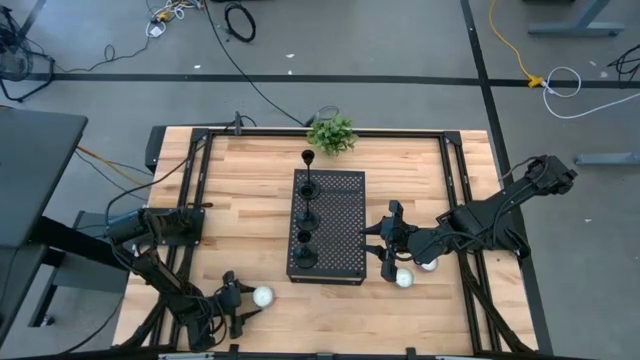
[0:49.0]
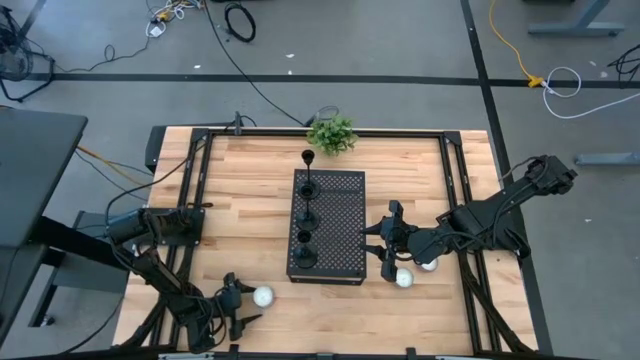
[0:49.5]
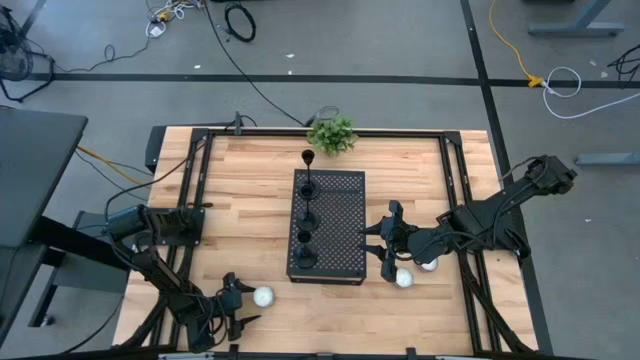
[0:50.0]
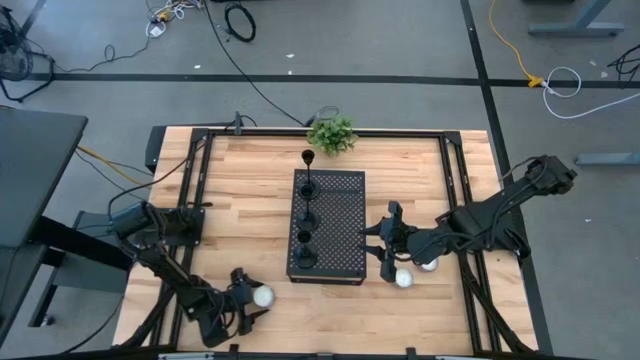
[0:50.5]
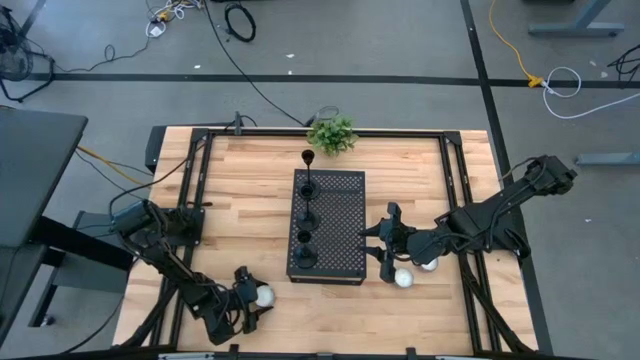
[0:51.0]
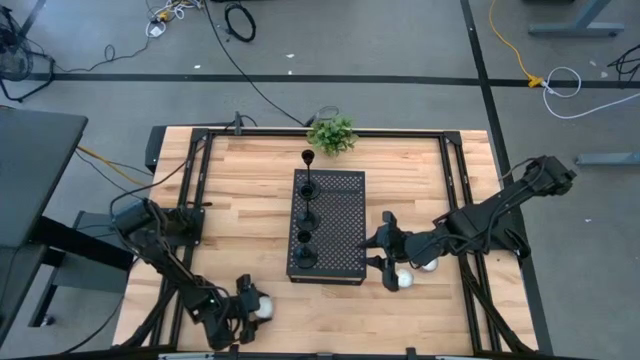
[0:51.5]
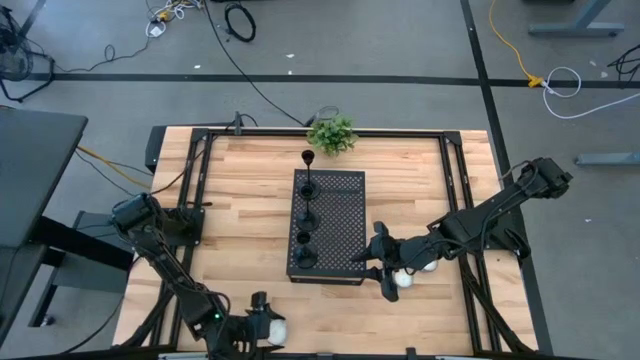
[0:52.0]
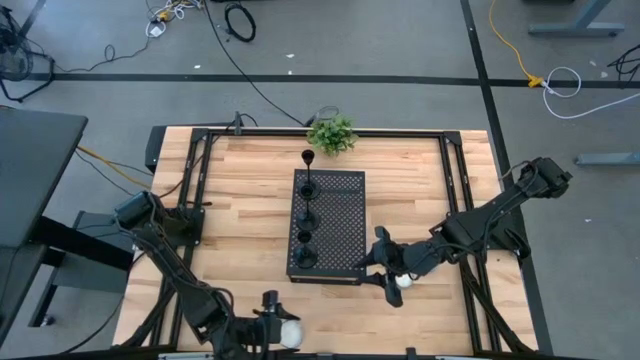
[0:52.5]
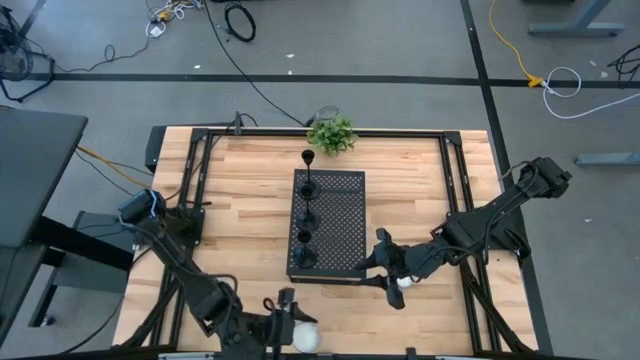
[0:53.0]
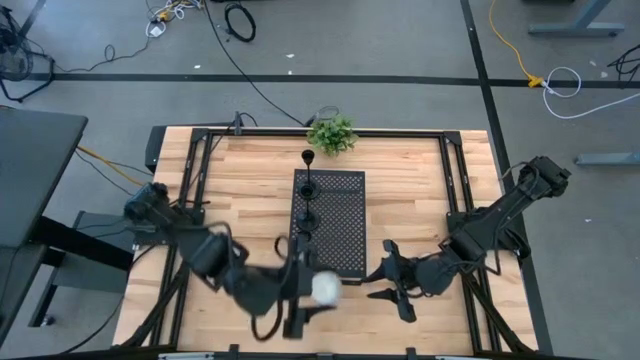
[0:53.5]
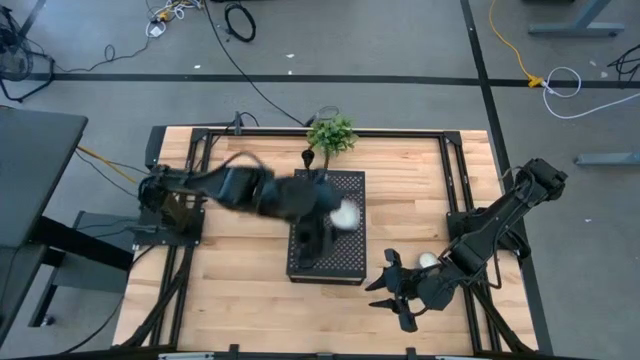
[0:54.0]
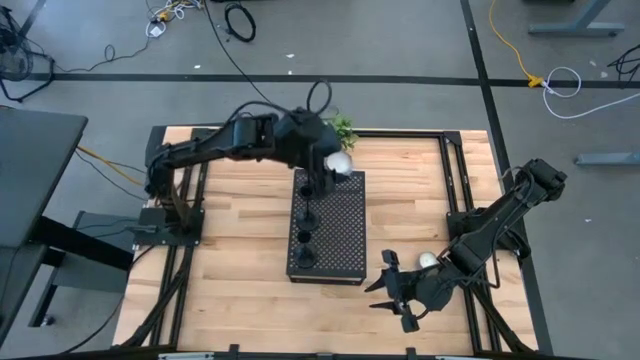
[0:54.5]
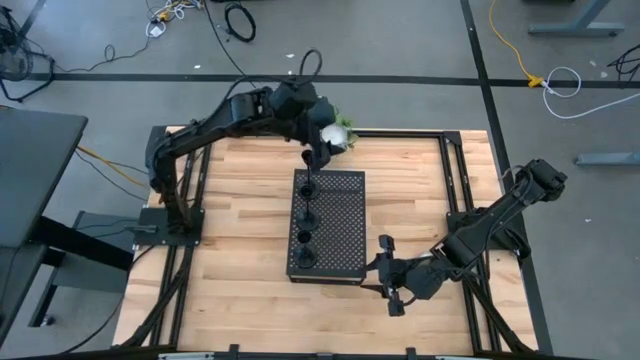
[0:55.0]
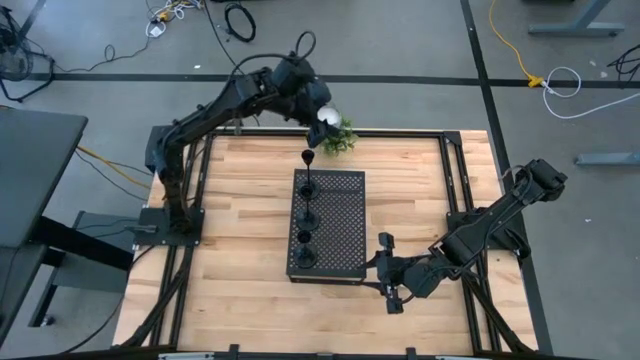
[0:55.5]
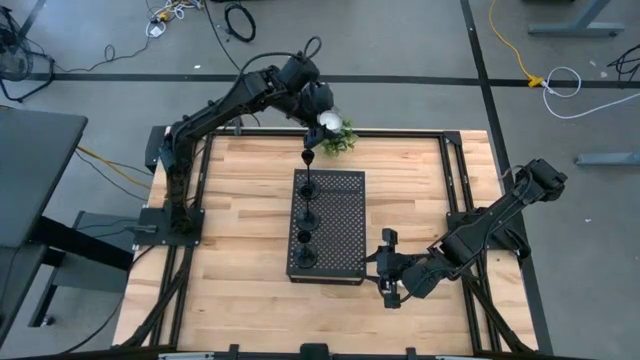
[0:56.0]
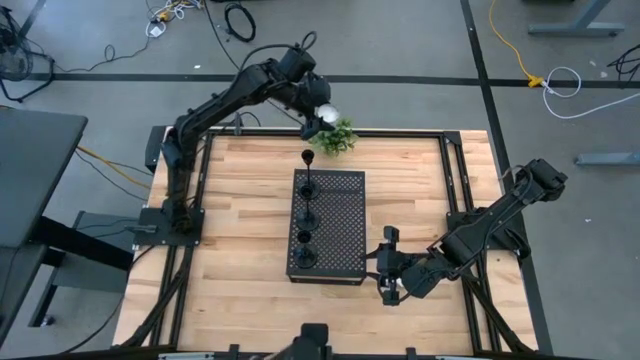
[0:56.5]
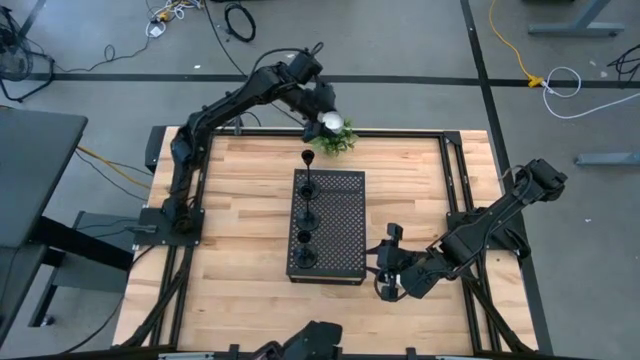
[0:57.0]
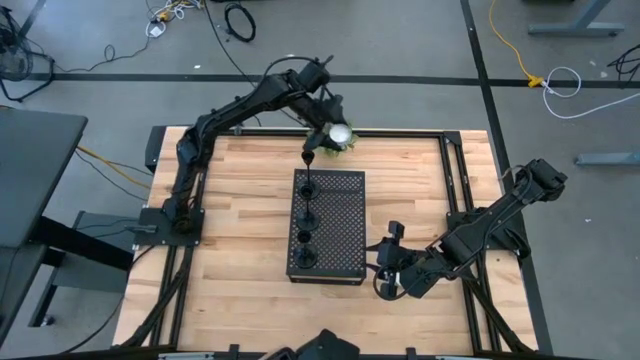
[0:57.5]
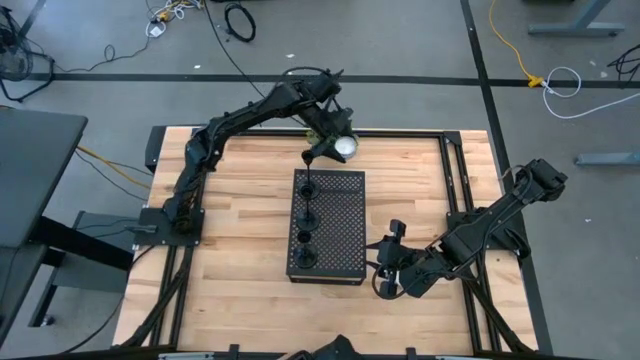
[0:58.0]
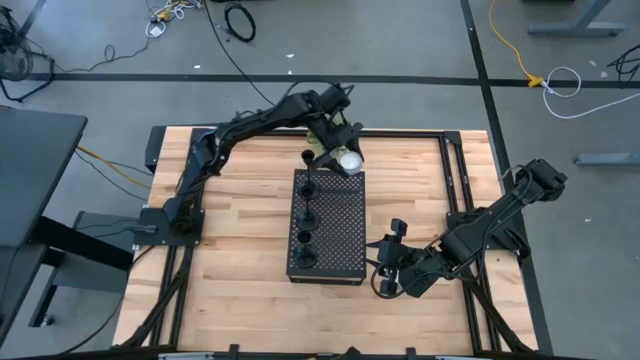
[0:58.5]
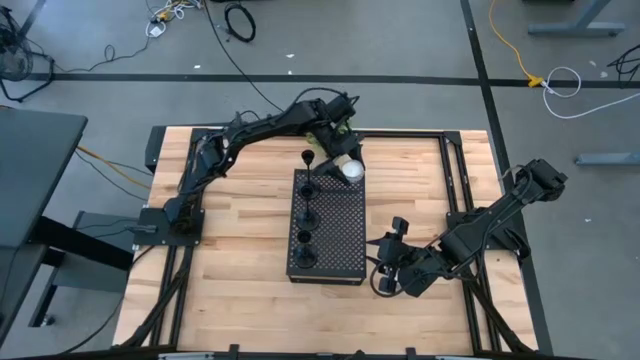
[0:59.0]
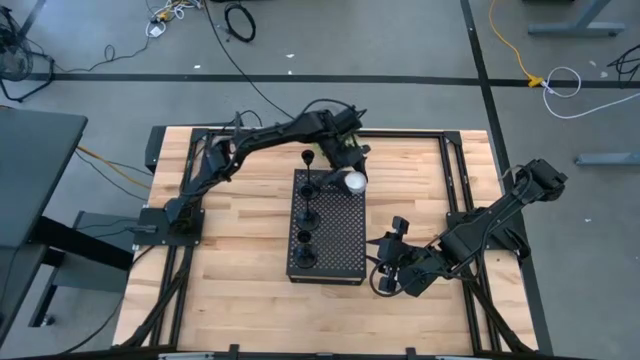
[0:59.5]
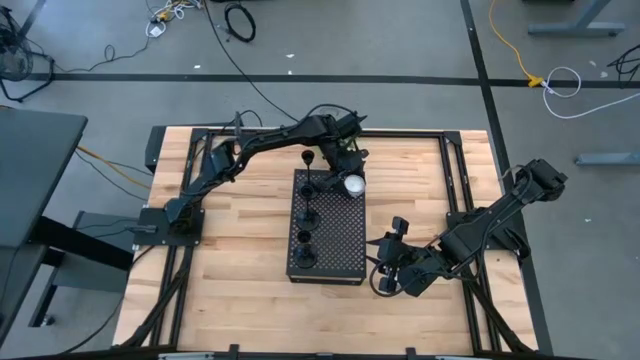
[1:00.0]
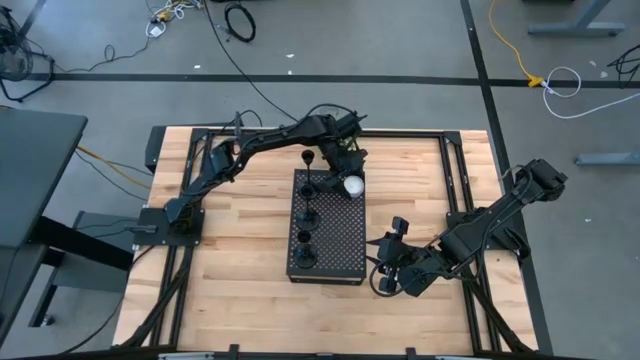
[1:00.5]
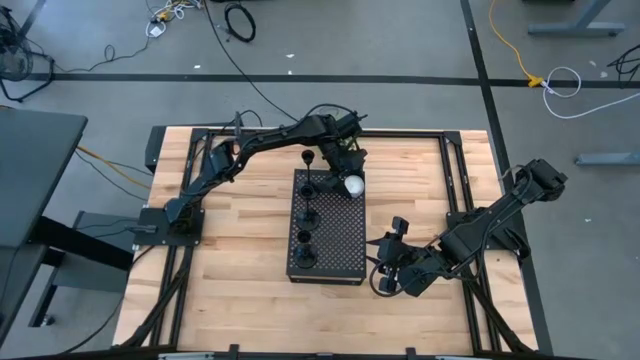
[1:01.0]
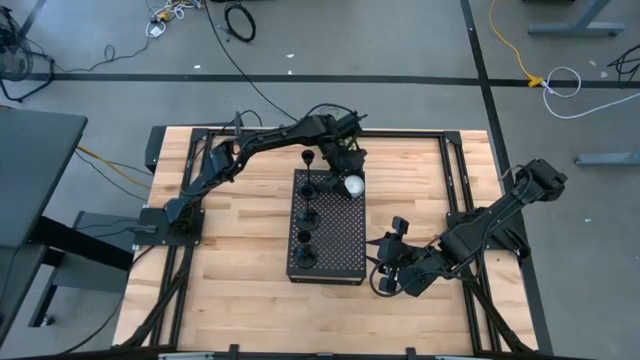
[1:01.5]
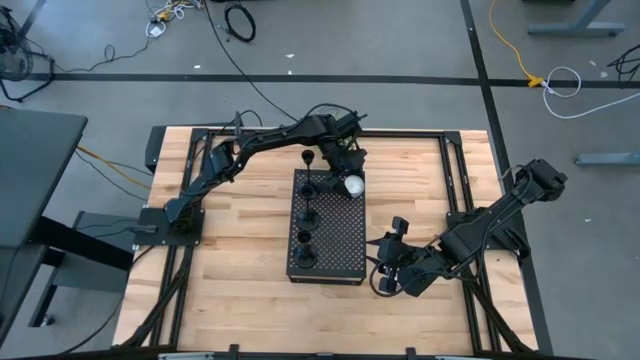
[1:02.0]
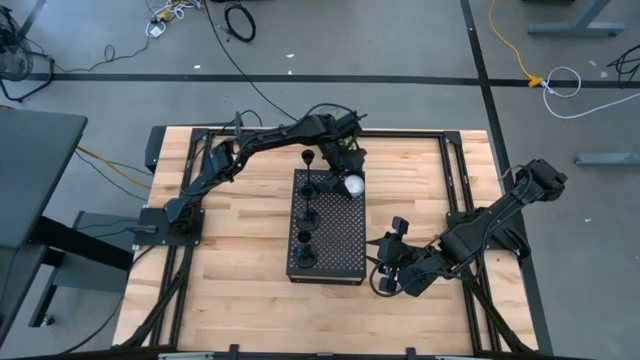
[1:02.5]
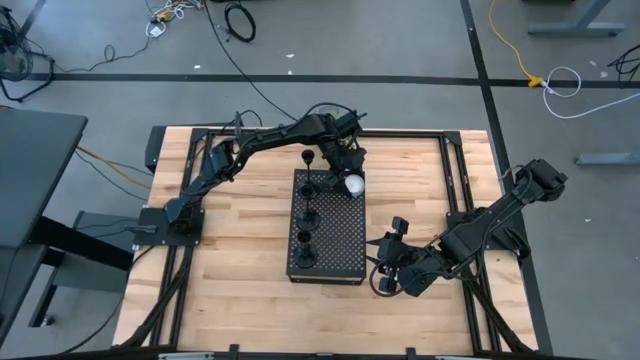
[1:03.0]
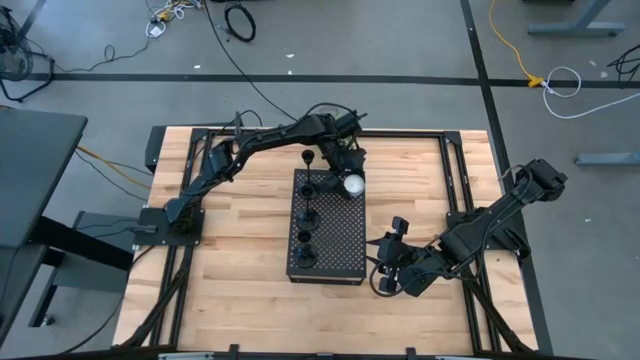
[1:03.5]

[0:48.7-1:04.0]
Task: Pick & Place candle stick holders
Put the white scented candle on the shelf
